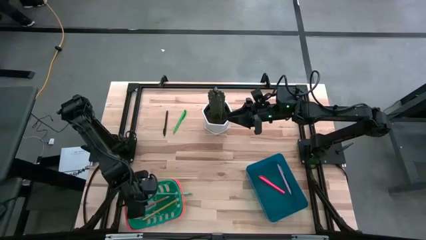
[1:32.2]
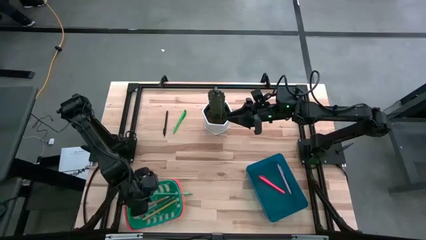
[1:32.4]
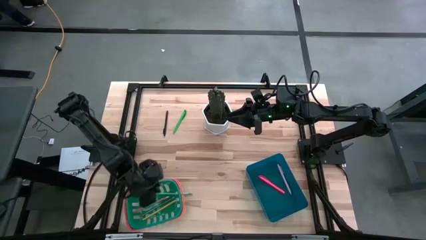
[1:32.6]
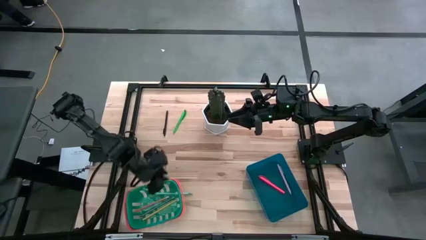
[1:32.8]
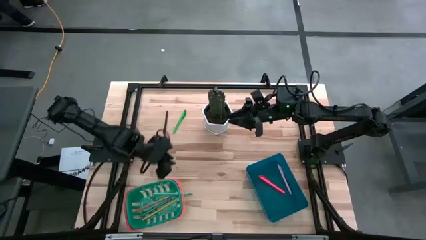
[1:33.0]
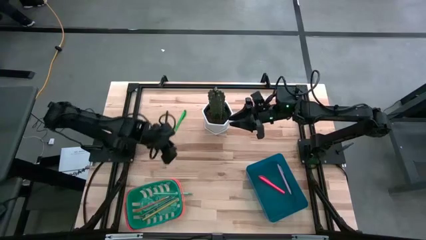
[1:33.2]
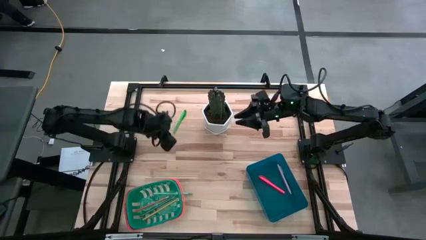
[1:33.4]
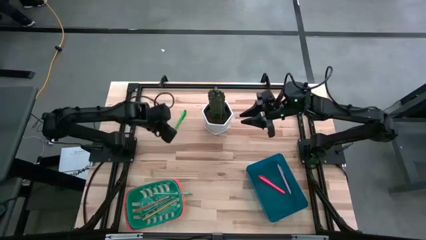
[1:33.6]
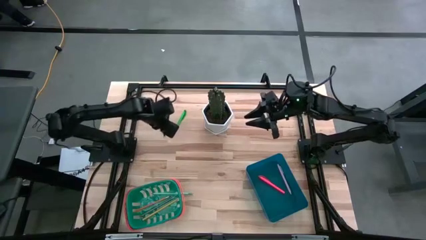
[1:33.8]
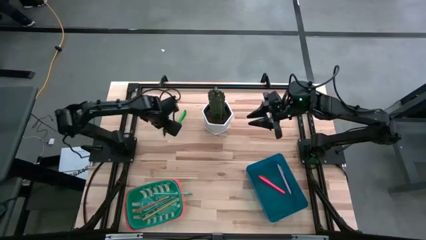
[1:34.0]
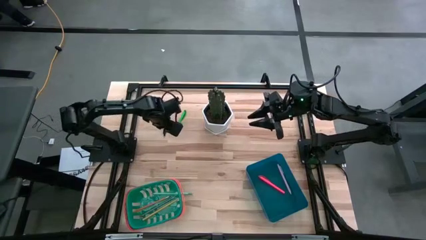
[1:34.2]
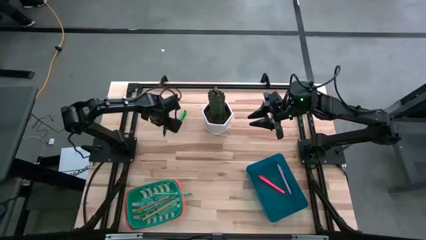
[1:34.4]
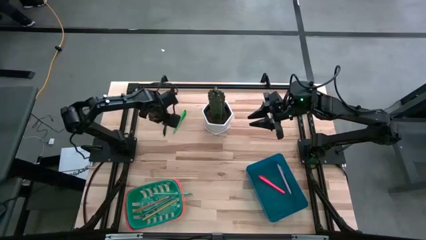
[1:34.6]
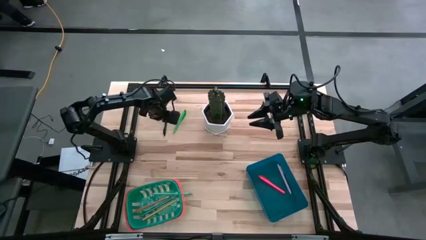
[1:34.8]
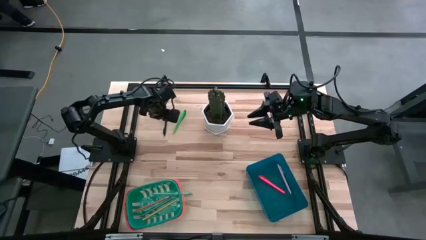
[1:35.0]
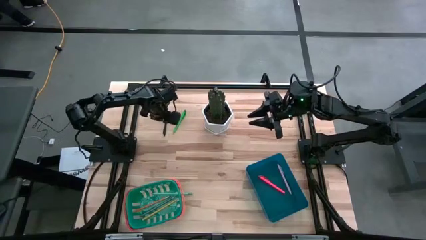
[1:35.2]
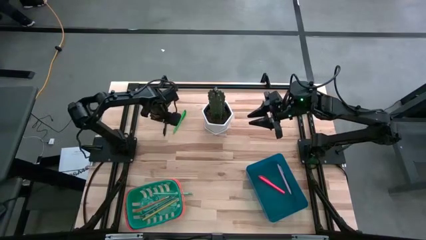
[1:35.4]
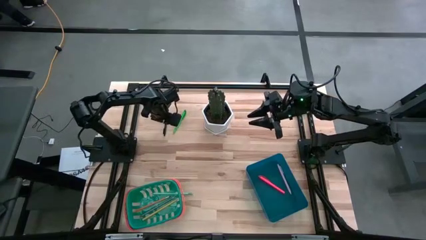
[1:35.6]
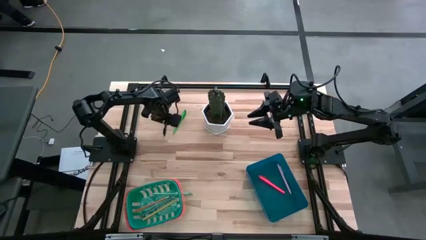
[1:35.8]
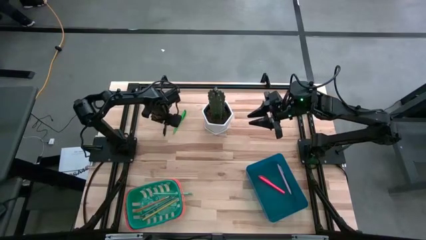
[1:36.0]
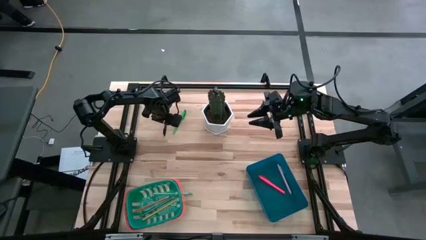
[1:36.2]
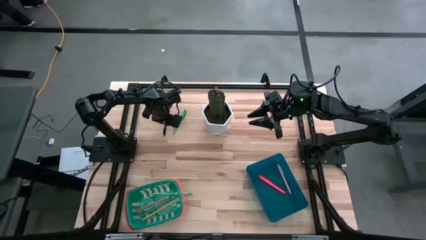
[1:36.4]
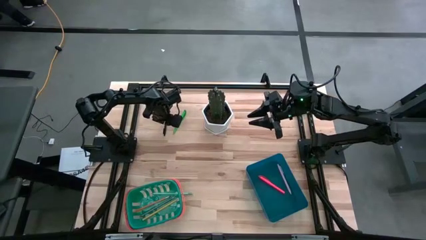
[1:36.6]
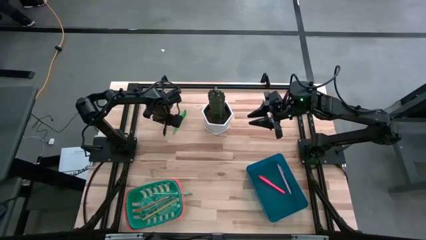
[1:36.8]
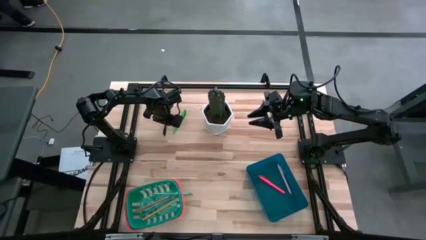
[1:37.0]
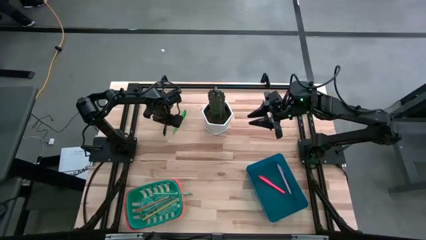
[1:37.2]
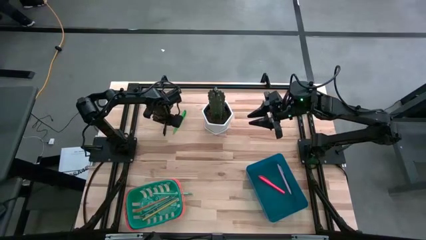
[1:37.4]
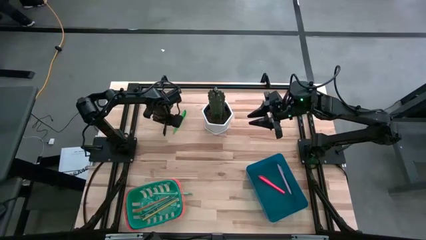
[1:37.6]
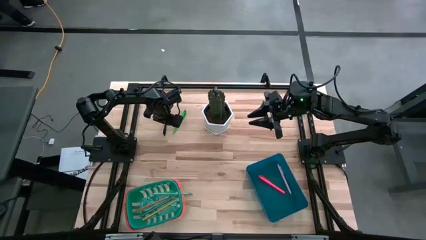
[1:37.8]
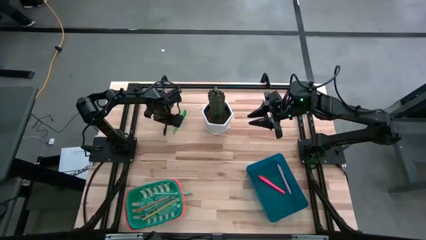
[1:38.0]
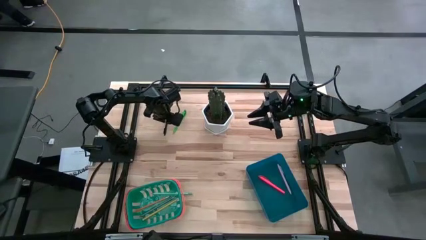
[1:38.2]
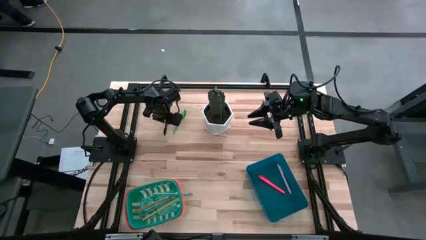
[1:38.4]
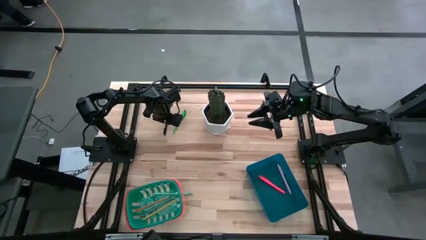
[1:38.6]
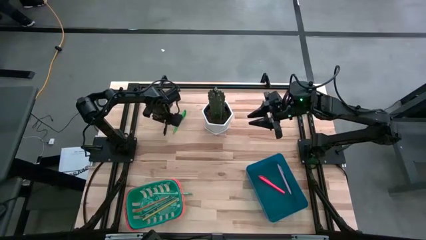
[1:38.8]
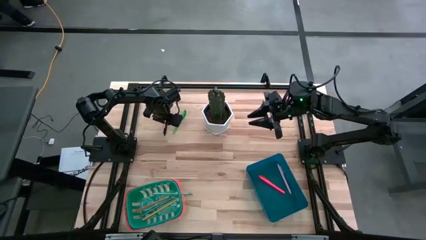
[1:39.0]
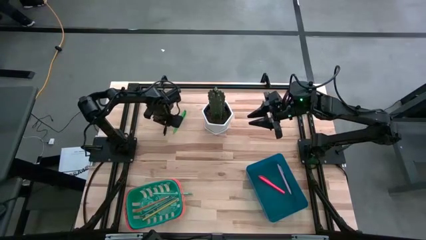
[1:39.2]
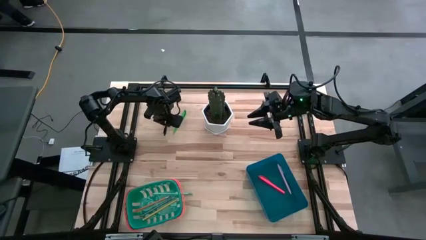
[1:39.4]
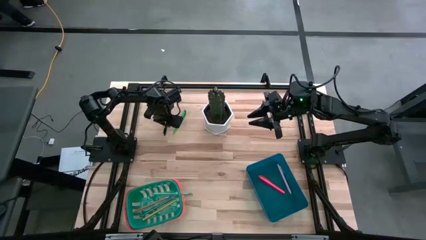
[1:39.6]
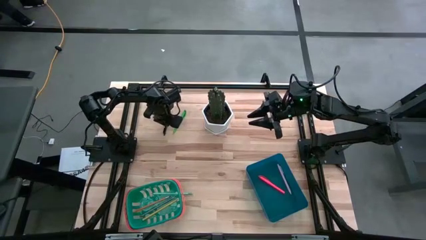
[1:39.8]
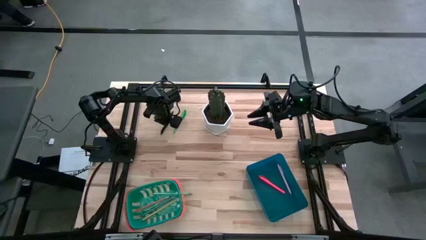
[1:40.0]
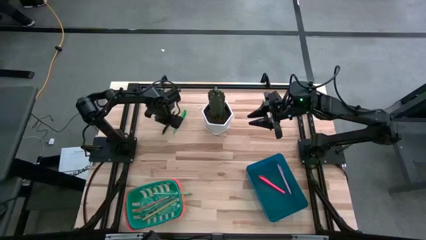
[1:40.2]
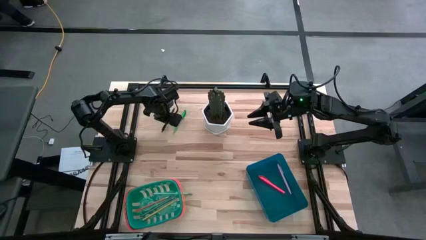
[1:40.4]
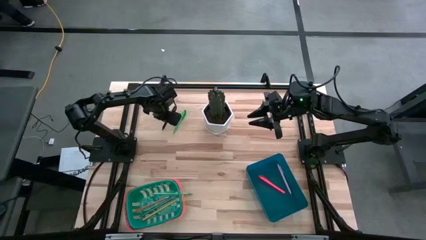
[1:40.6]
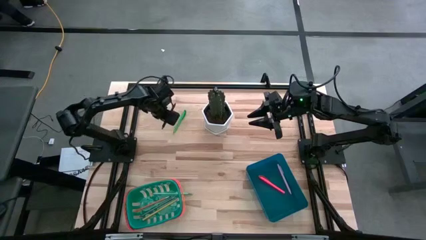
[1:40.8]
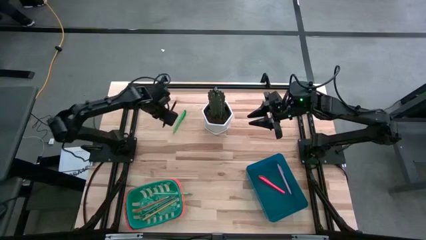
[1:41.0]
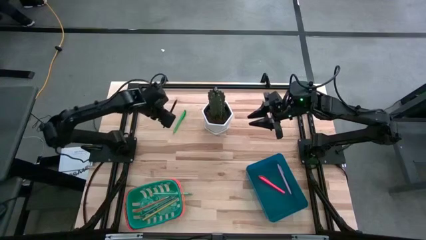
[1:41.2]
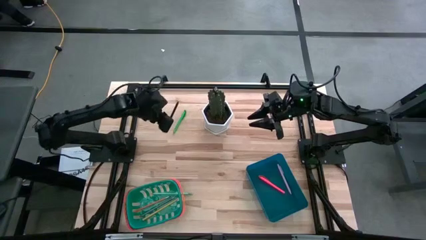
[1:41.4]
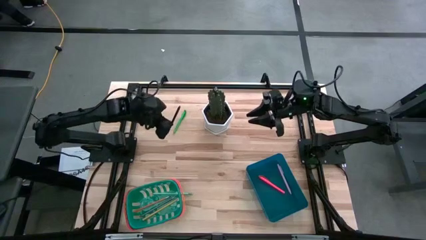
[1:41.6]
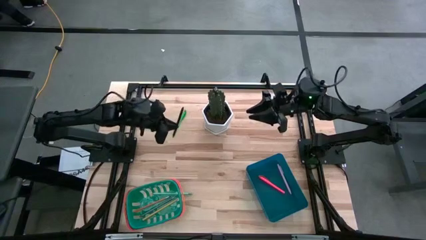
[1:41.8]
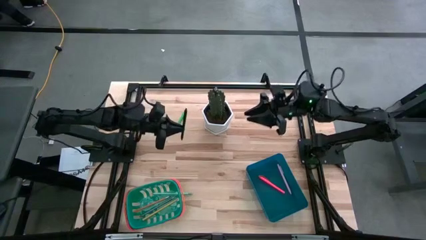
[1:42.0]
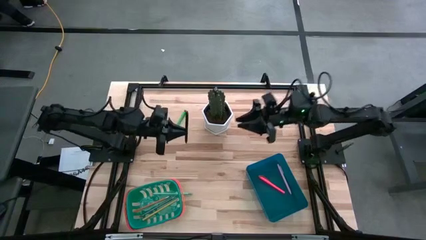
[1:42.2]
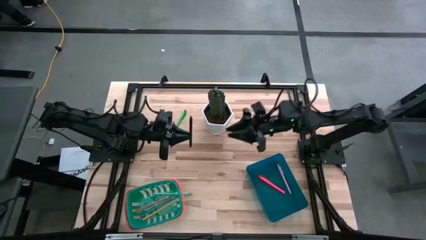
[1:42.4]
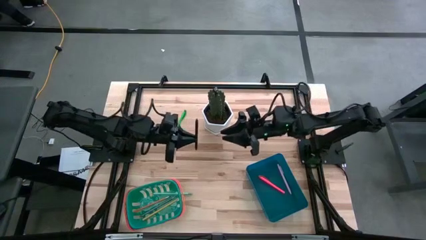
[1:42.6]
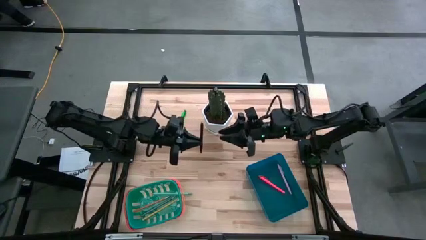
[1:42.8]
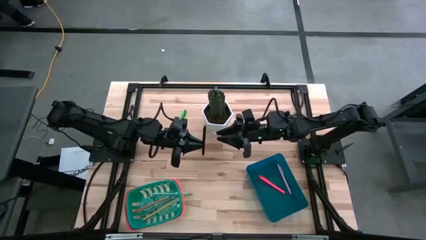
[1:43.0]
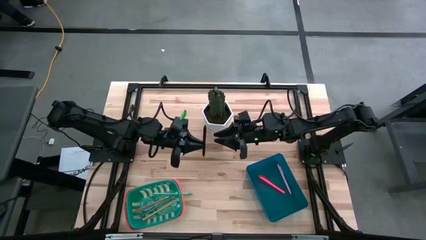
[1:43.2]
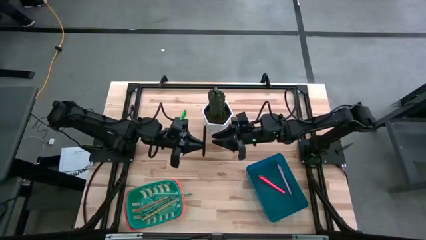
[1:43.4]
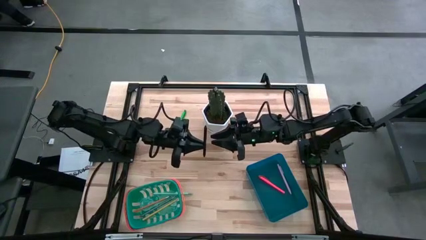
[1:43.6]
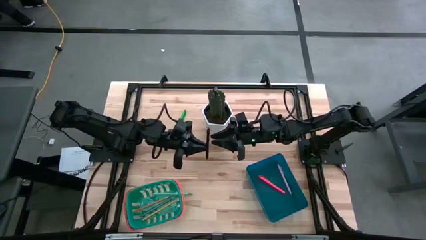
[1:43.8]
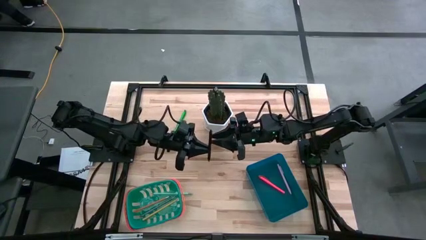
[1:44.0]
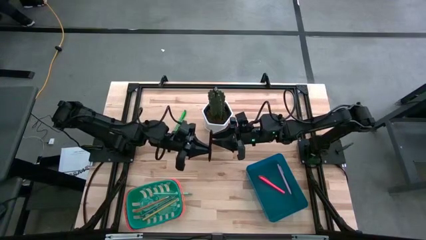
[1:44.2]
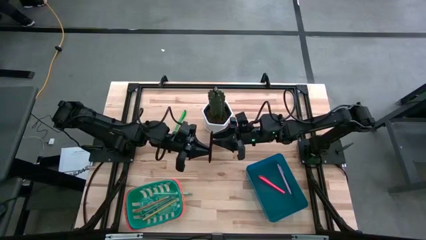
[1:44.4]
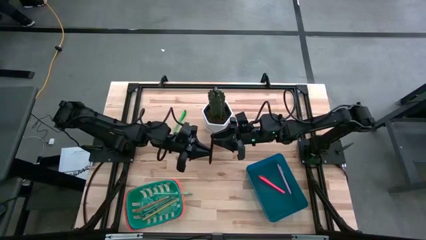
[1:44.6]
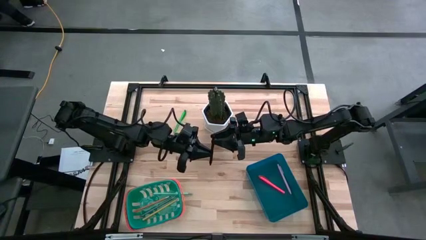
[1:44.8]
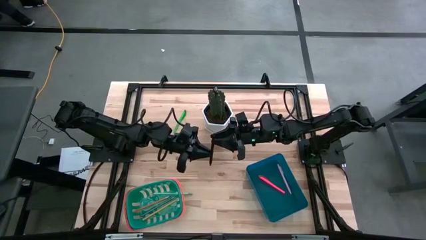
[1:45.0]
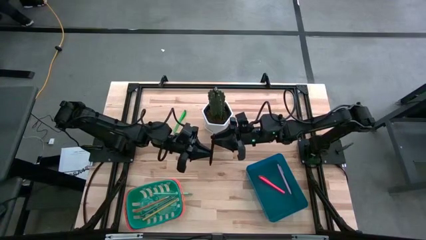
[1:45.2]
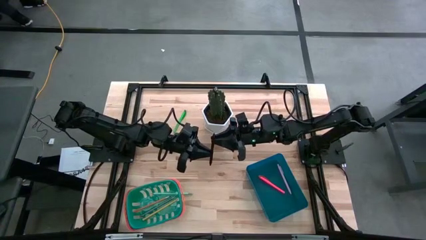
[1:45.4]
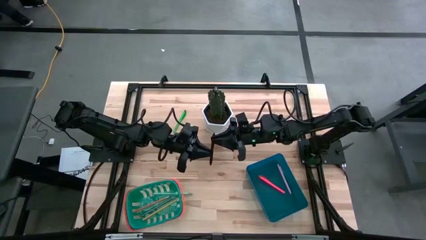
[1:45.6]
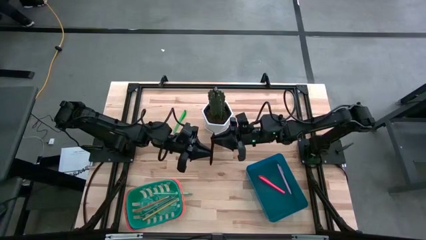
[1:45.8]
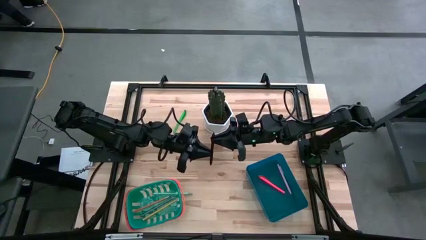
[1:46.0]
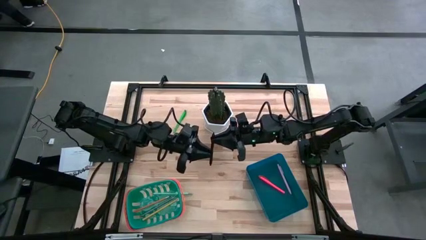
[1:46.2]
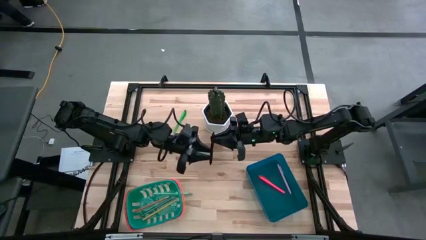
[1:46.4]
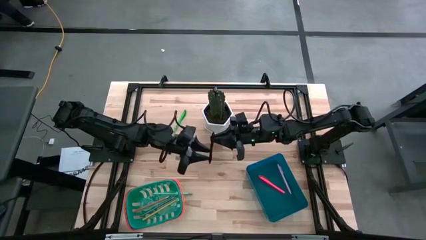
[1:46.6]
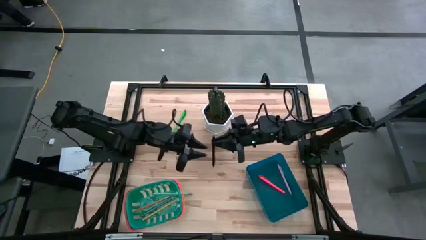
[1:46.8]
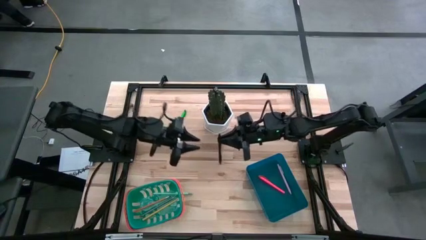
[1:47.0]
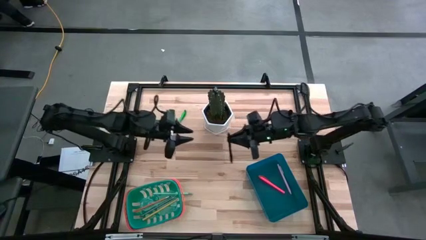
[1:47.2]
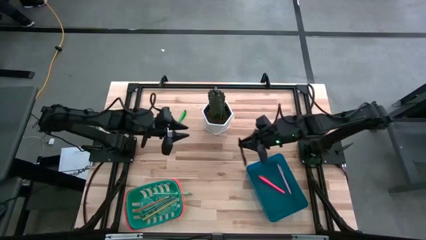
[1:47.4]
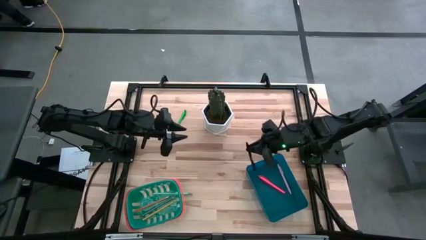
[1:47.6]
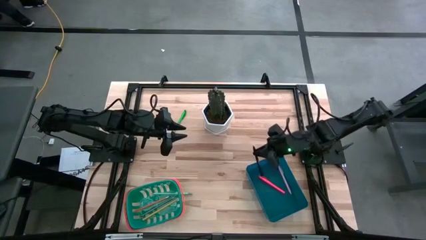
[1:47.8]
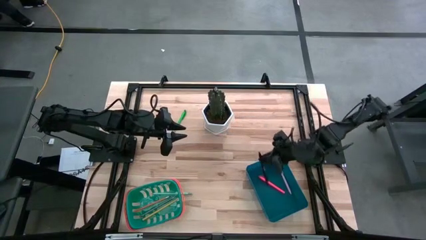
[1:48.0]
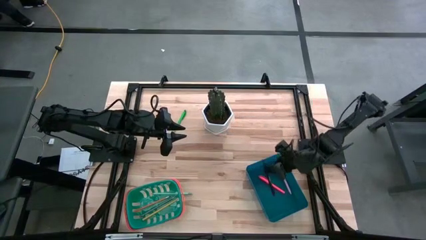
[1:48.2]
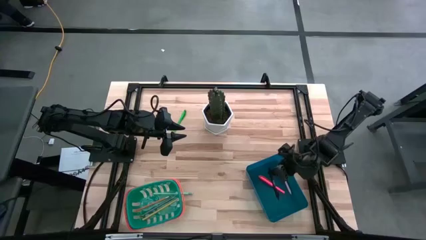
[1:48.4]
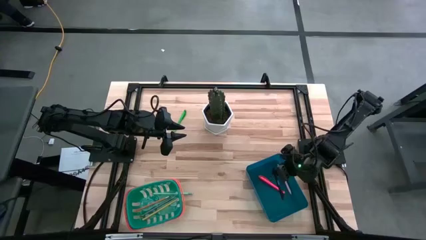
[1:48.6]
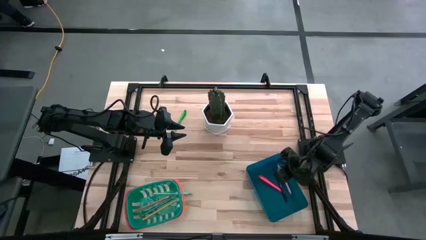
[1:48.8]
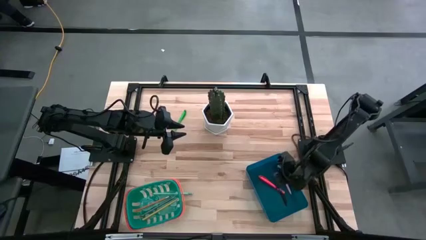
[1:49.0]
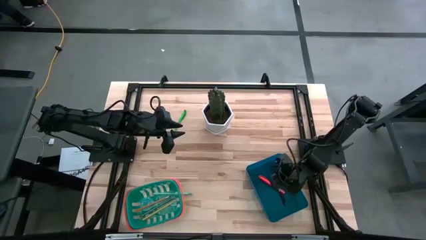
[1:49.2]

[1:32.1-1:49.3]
Task: Sort pens & pencils
Put the black pen into the blue bin
